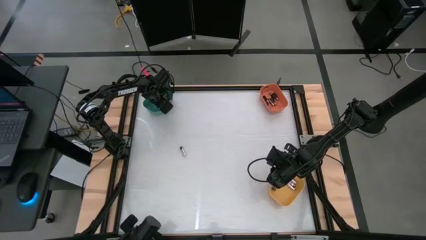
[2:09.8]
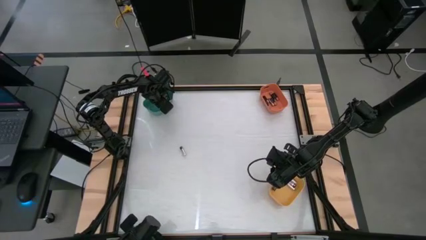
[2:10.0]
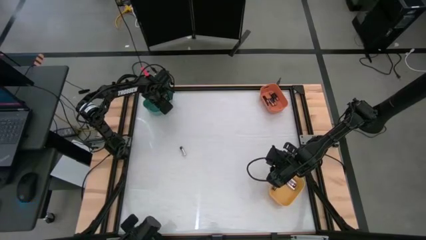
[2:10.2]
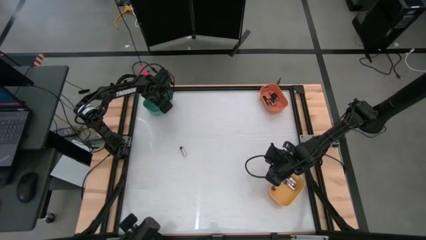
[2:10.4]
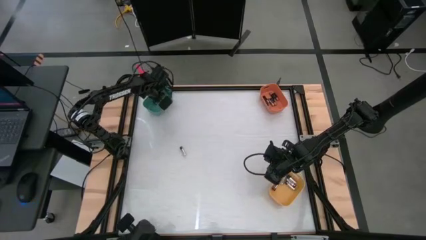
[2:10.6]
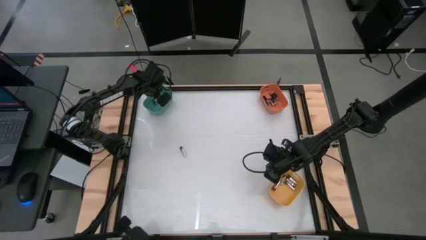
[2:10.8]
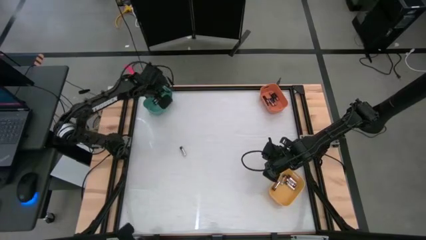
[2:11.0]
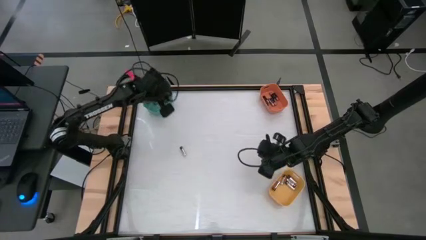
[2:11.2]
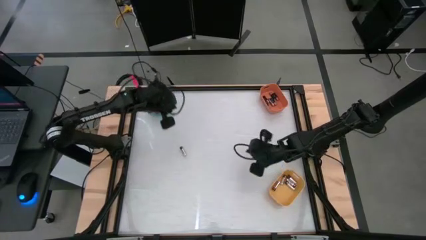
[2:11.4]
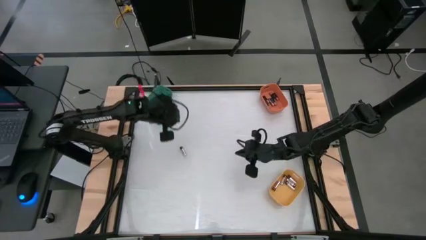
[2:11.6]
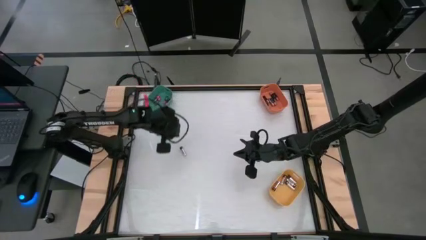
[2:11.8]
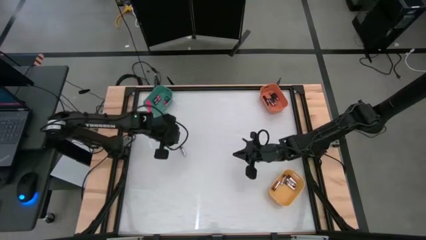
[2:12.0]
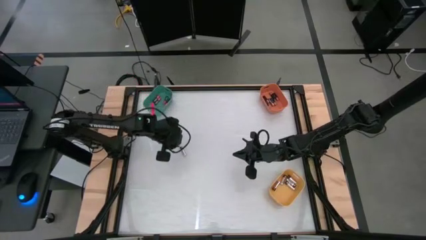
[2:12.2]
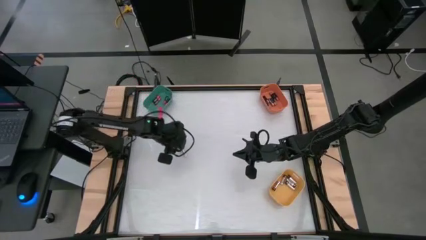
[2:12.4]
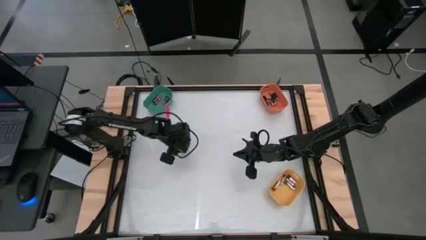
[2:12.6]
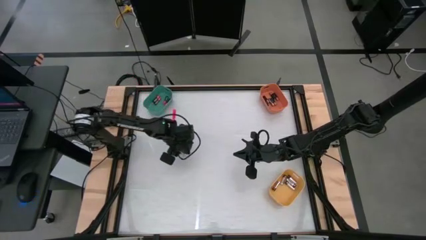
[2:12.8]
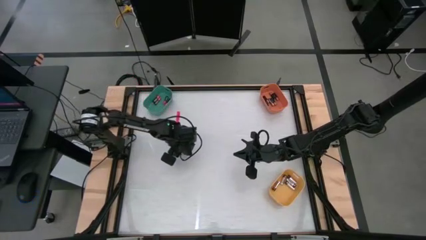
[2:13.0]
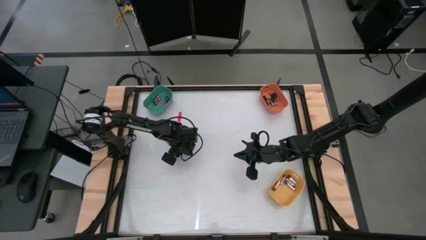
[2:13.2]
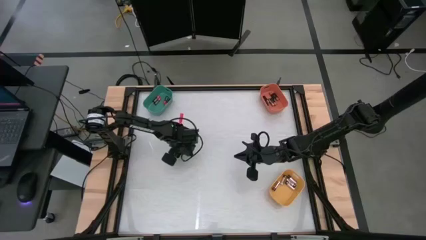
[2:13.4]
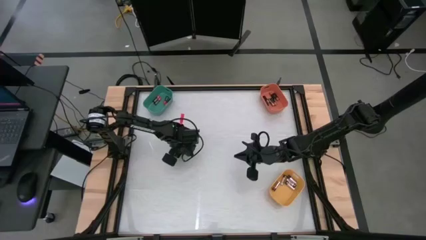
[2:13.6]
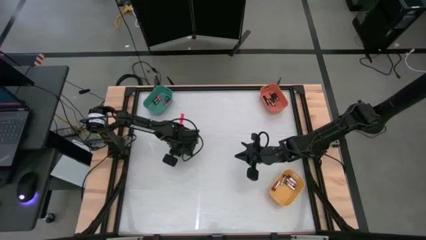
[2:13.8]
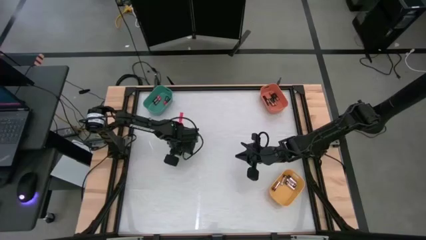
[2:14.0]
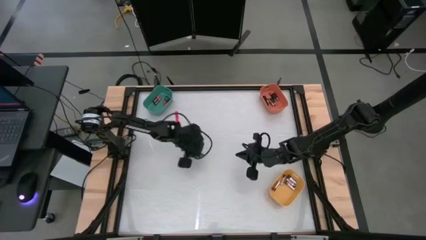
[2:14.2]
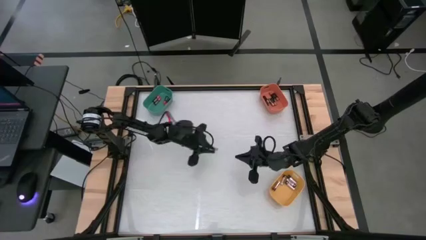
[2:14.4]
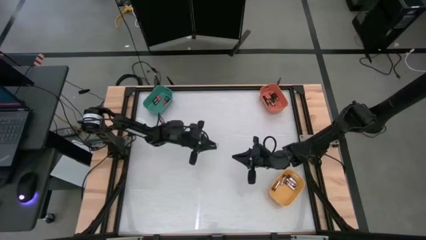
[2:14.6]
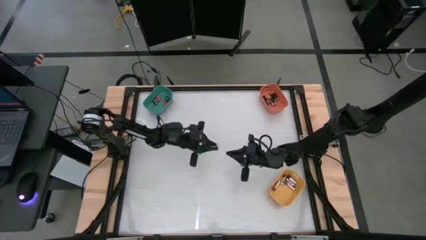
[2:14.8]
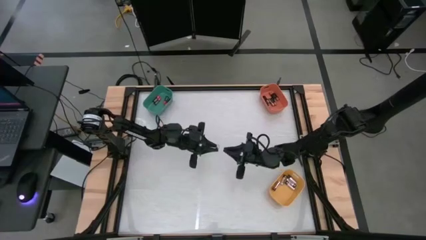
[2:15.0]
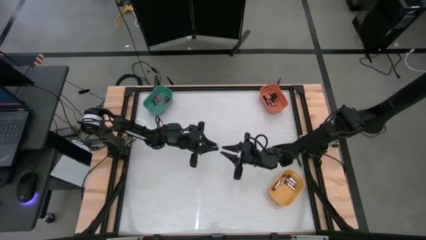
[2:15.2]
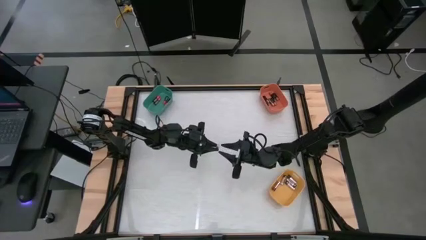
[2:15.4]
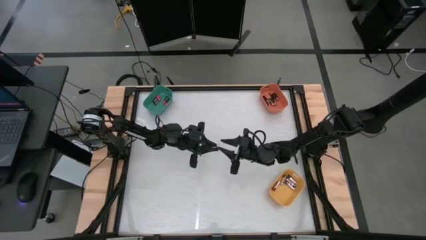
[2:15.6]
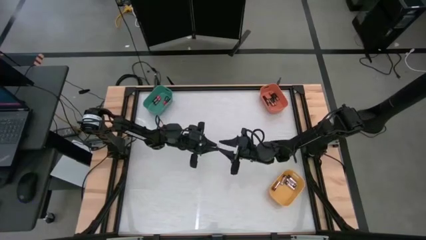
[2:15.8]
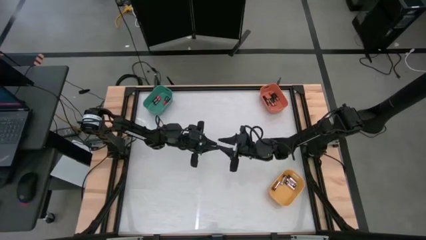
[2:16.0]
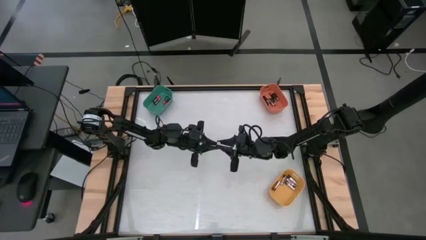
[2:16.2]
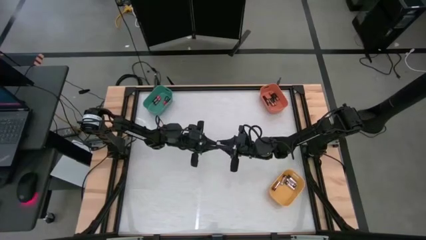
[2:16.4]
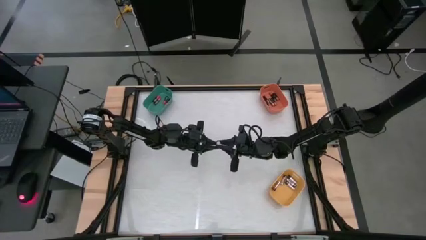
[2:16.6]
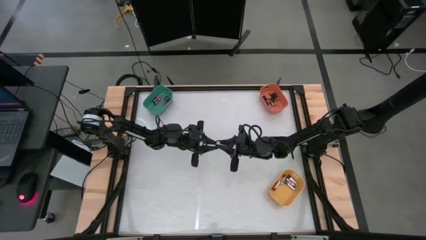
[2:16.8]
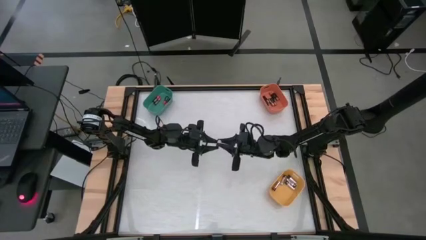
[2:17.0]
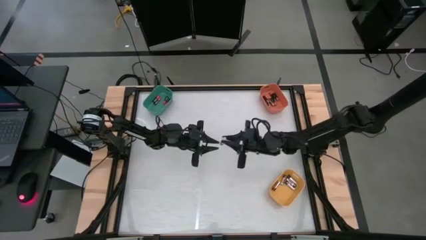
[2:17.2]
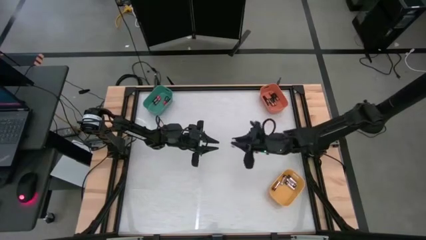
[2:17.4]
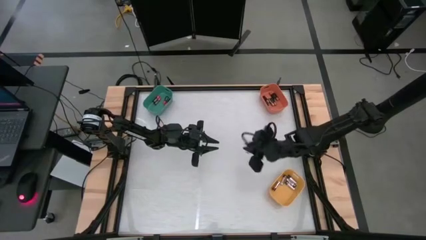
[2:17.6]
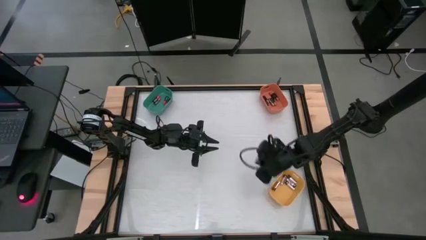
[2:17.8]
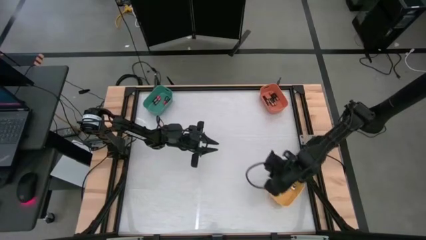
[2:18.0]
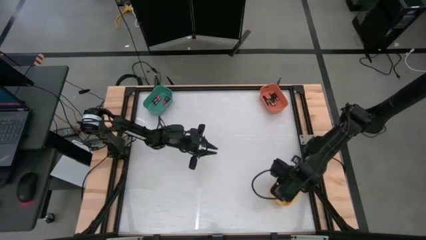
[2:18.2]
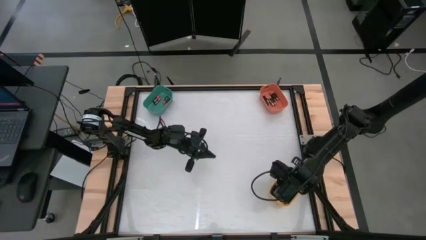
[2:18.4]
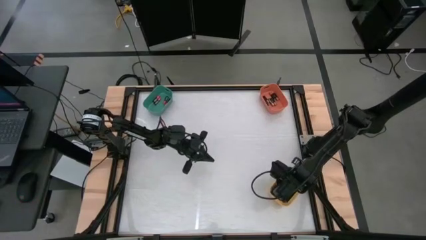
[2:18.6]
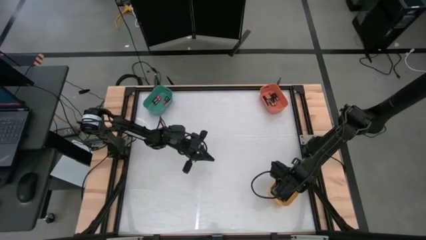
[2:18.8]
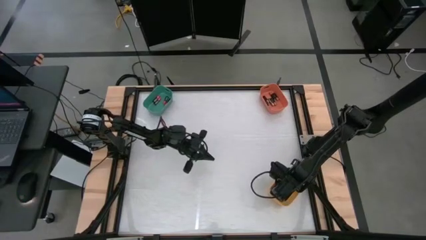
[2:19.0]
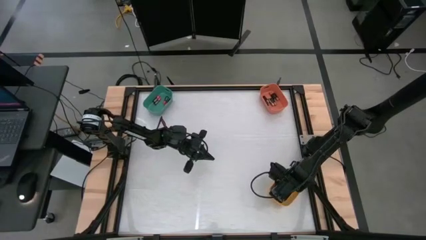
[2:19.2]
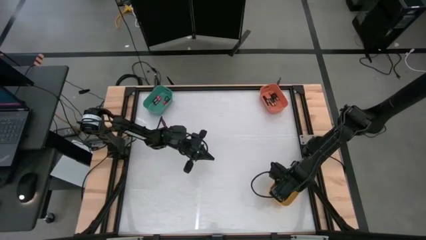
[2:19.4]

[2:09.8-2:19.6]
Task: Sort batteries
Put the silver battery into the yellow bin

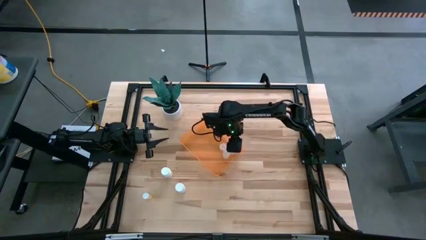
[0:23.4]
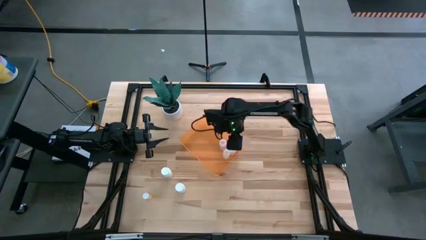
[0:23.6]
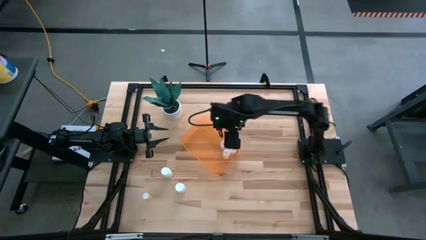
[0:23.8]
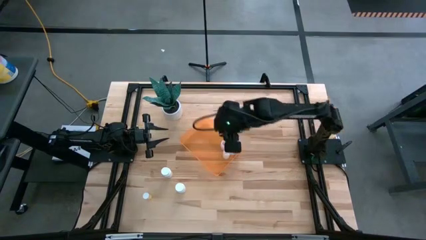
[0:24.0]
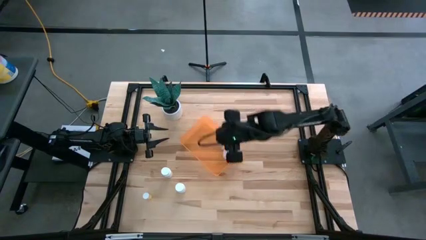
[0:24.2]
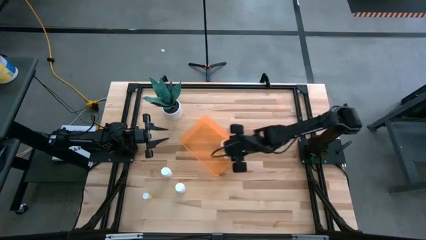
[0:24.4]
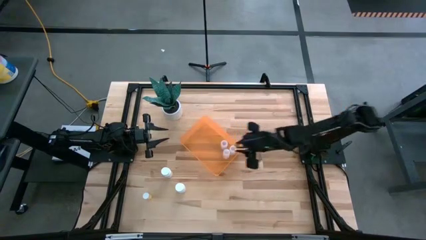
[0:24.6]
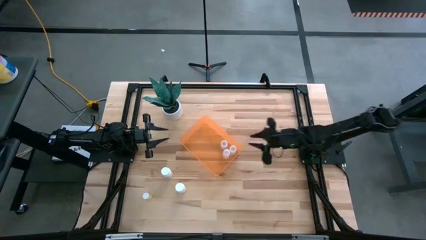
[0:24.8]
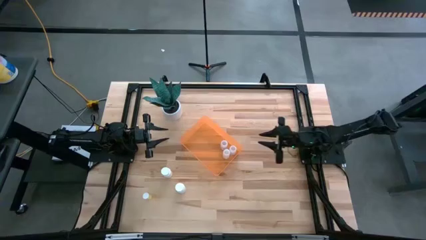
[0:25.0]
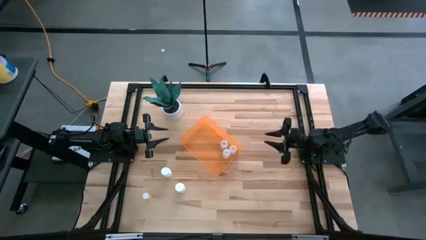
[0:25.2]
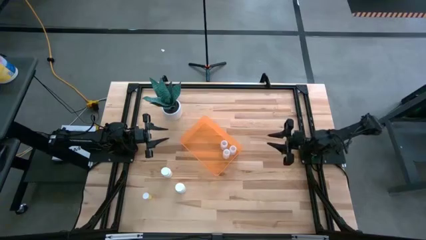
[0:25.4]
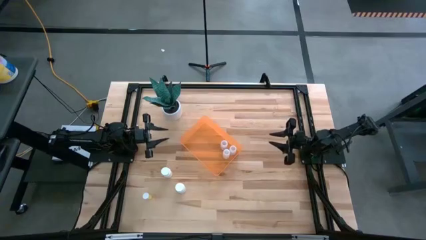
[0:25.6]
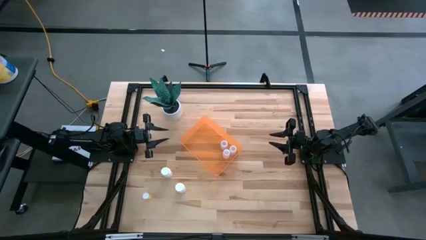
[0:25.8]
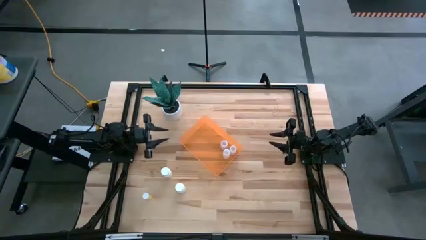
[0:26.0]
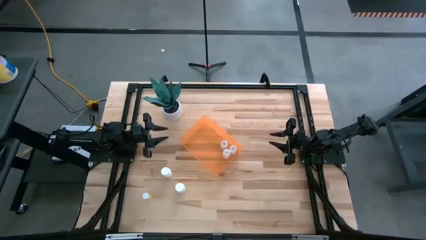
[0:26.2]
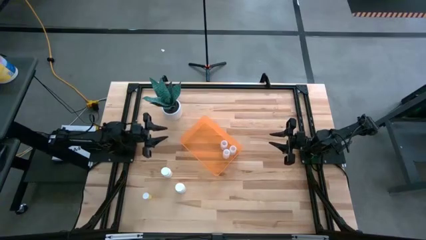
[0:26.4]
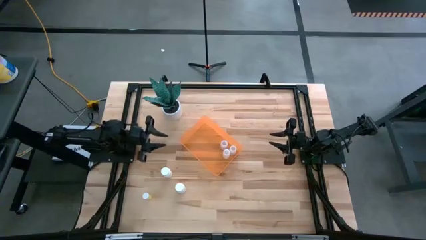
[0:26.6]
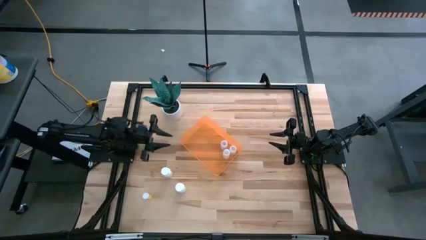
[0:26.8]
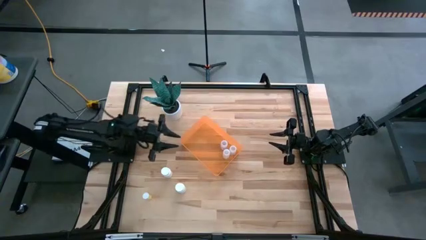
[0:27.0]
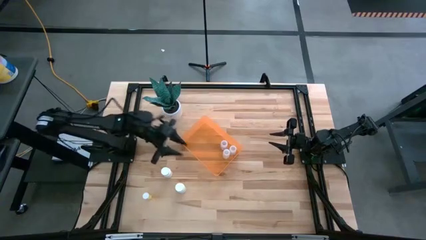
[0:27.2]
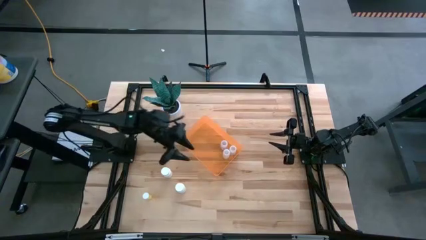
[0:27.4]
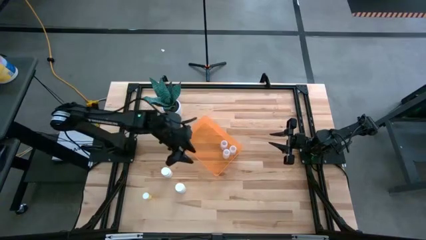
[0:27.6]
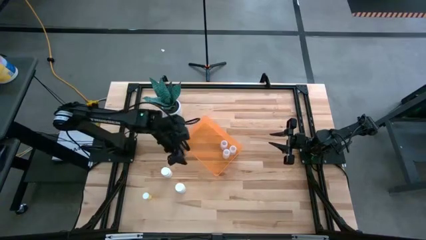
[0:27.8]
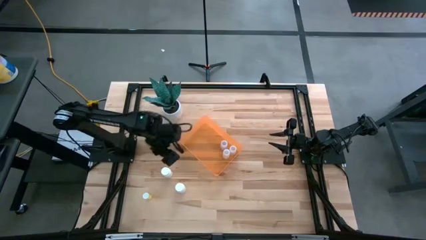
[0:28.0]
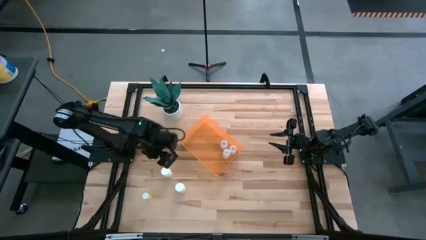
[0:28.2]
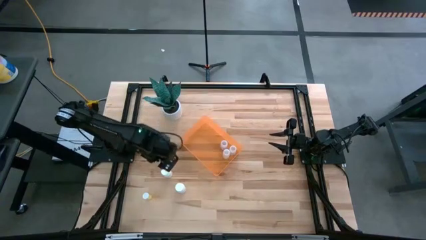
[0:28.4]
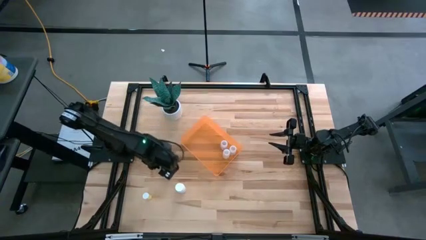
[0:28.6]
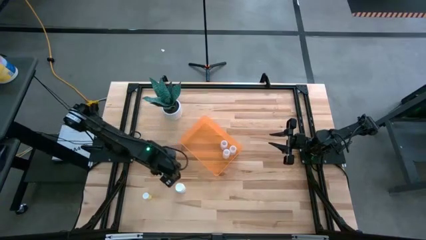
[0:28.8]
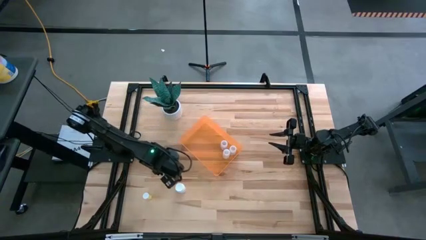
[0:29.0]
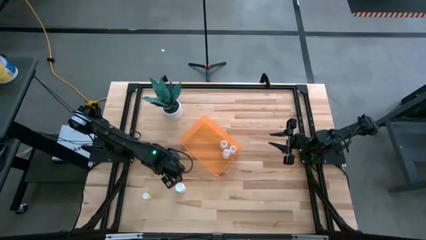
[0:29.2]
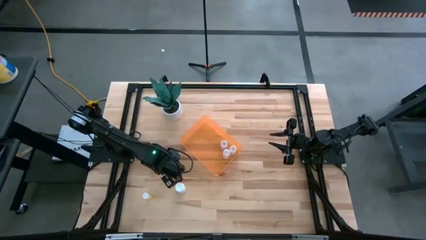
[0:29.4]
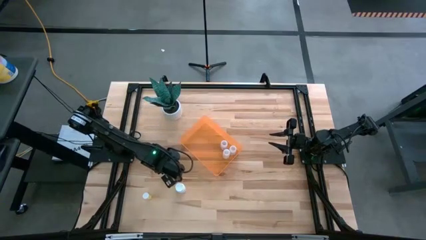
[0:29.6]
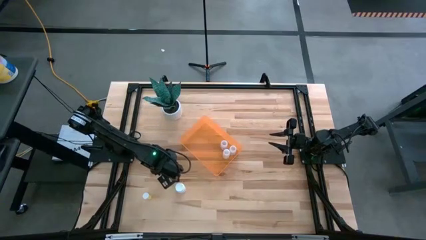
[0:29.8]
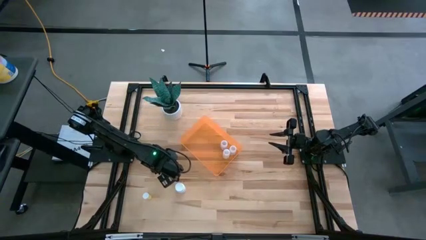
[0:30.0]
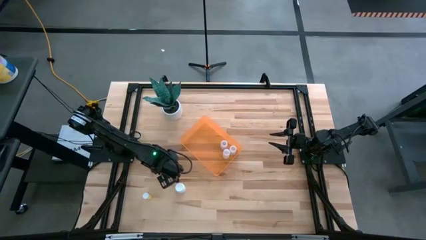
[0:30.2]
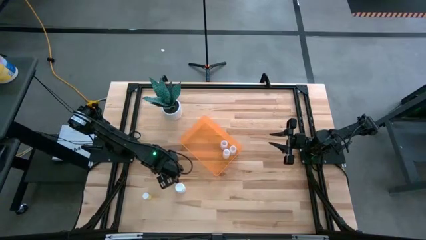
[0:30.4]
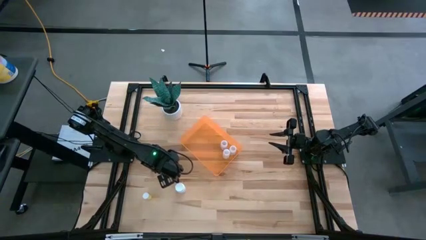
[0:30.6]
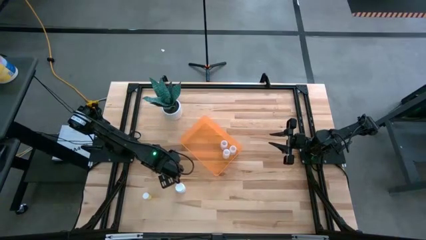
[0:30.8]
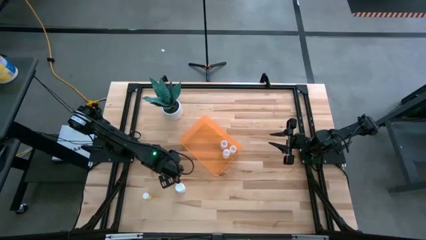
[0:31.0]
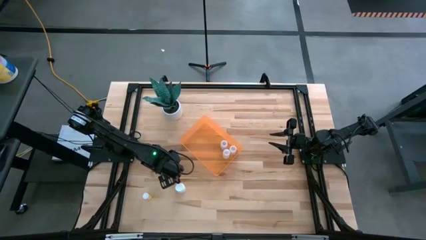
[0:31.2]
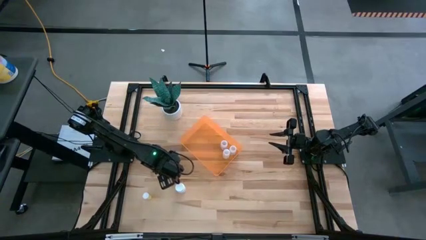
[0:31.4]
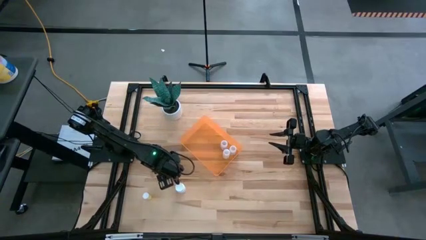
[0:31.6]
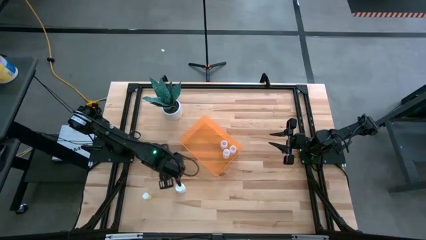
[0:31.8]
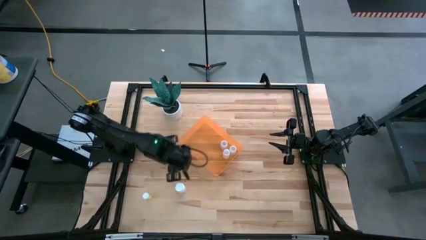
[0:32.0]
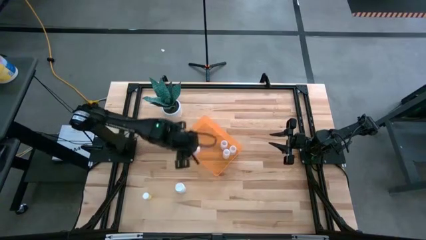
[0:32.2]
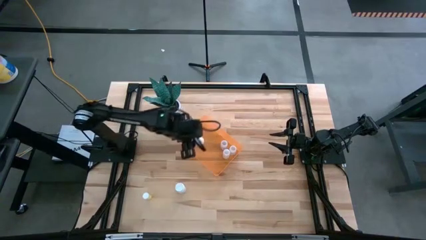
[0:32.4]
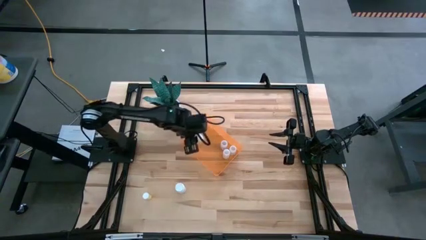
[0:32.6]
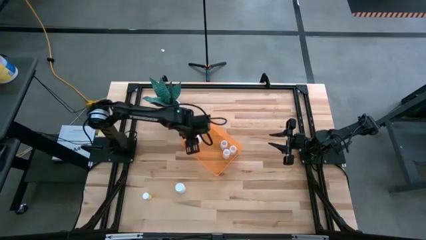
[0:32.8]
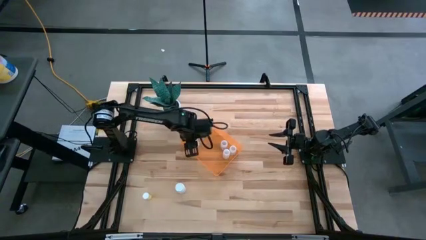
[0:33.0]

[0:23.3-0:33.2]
Task: Pick and place pill bottles into a basket
Put the top white pill bottle into the transparent orange bin
